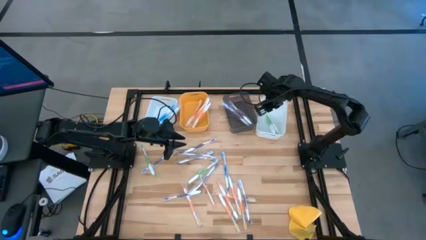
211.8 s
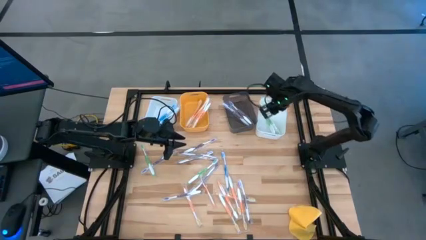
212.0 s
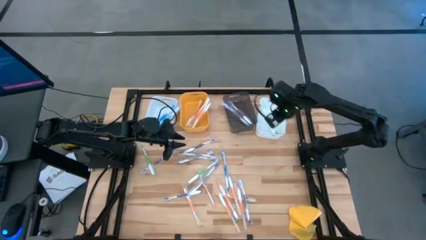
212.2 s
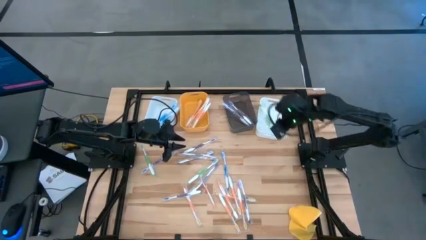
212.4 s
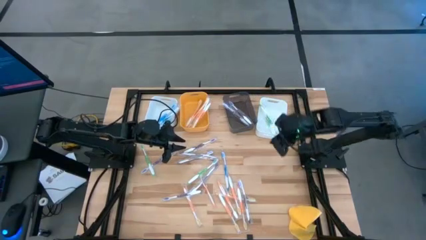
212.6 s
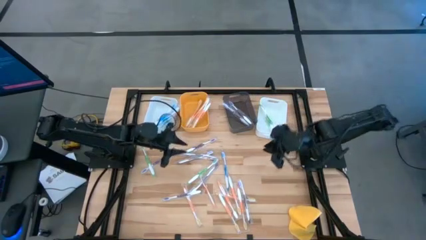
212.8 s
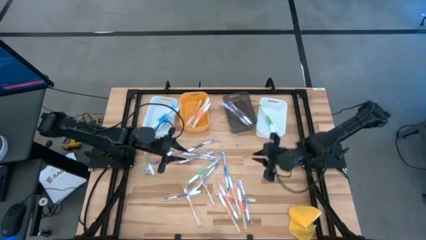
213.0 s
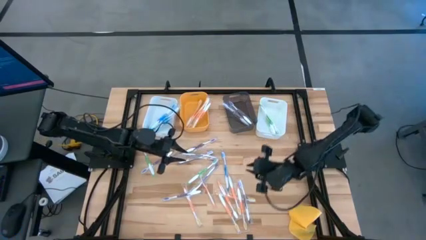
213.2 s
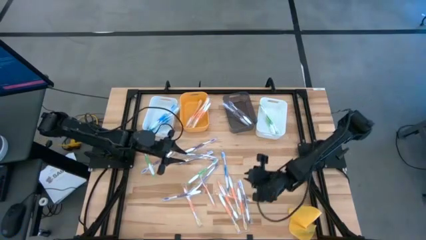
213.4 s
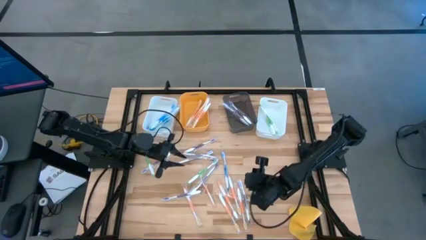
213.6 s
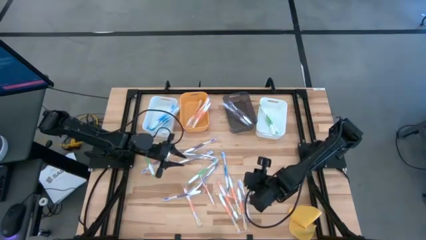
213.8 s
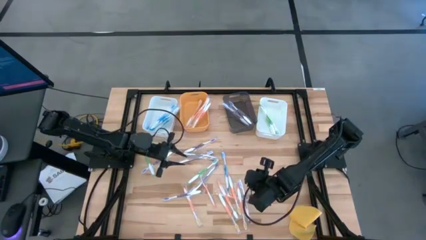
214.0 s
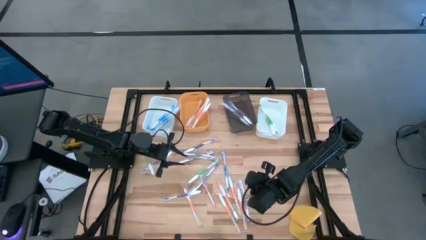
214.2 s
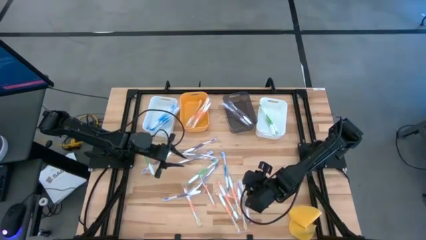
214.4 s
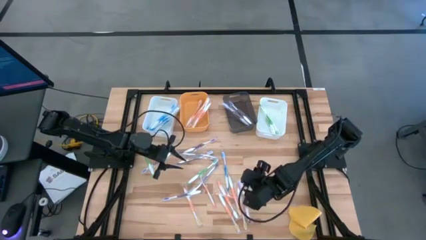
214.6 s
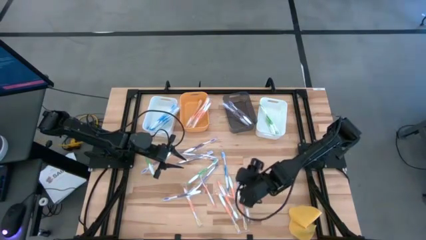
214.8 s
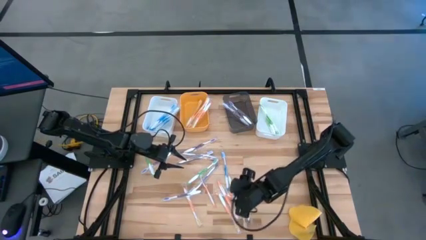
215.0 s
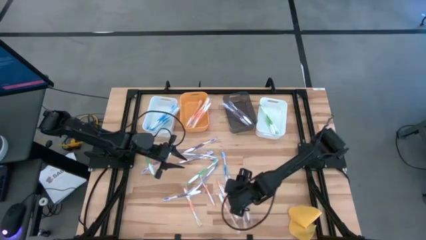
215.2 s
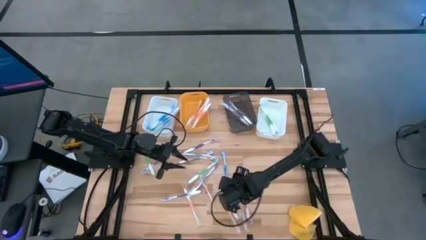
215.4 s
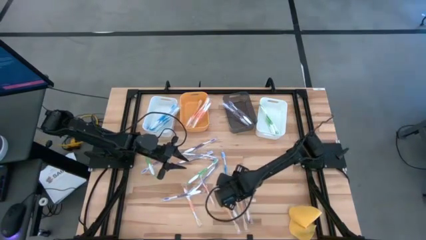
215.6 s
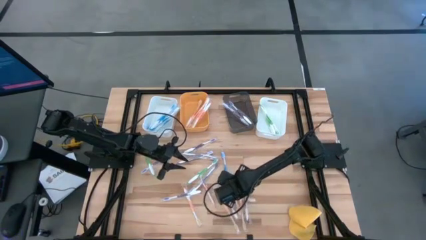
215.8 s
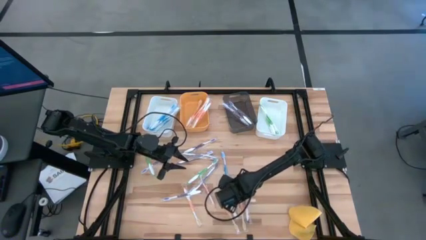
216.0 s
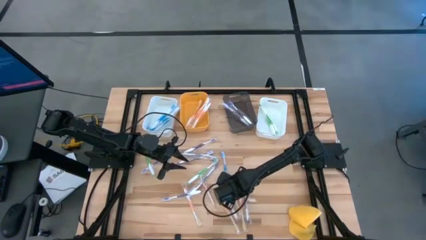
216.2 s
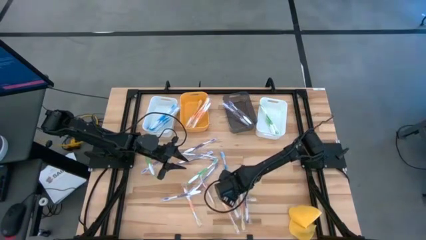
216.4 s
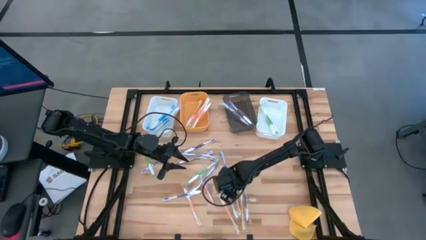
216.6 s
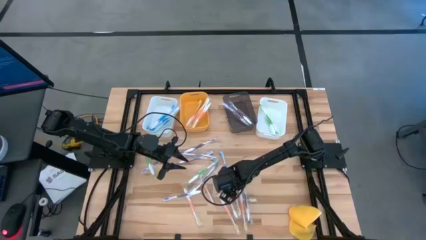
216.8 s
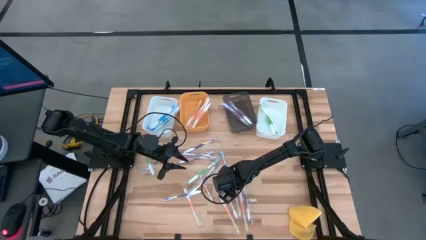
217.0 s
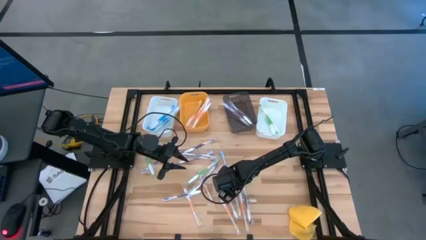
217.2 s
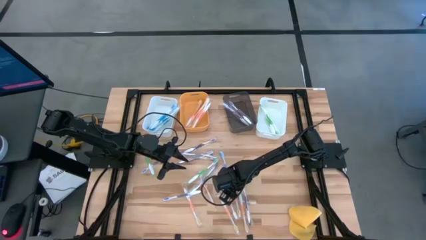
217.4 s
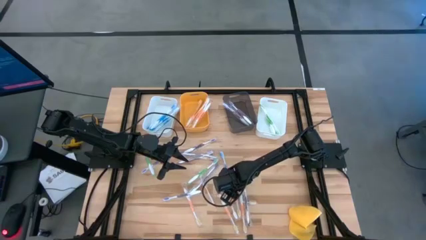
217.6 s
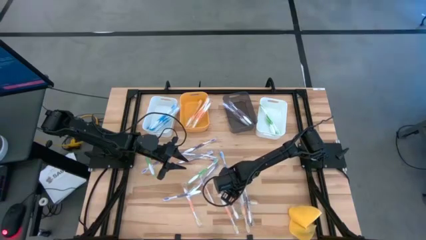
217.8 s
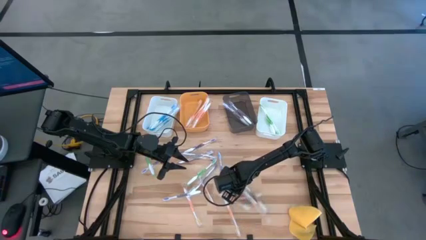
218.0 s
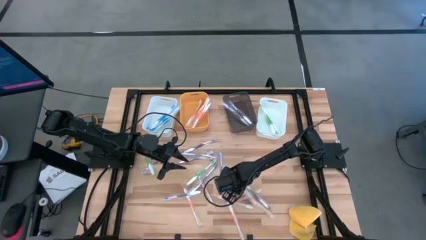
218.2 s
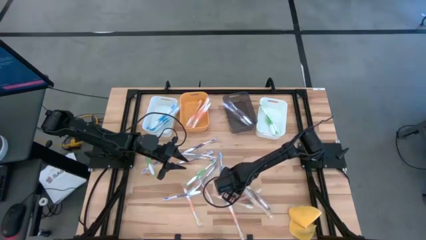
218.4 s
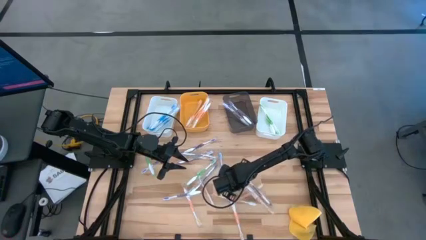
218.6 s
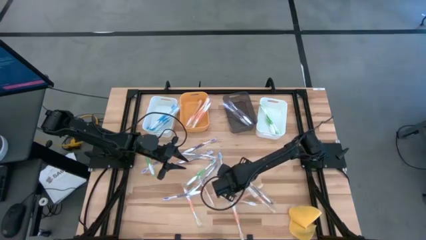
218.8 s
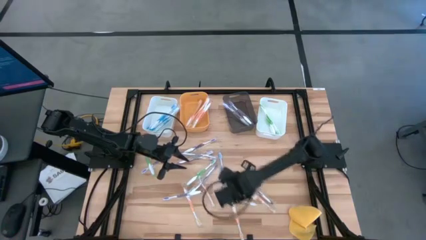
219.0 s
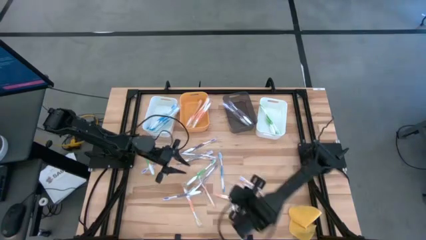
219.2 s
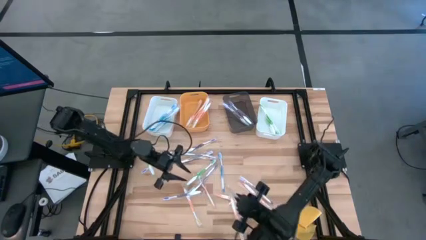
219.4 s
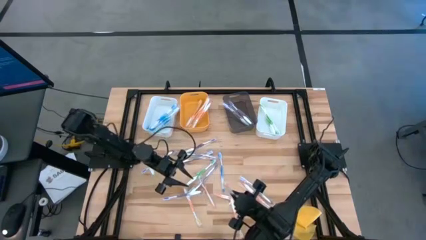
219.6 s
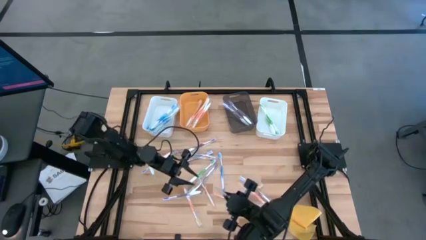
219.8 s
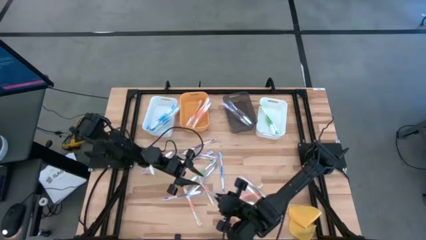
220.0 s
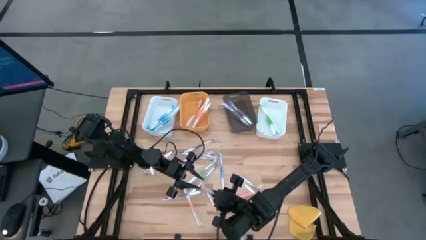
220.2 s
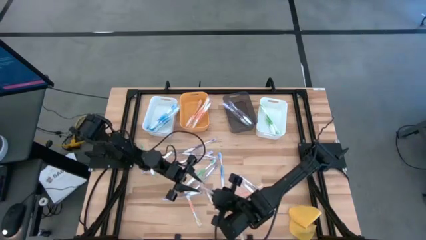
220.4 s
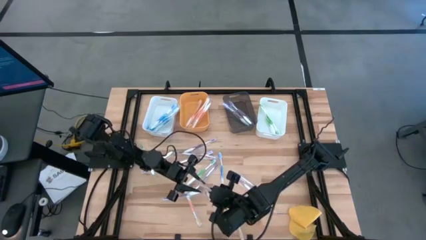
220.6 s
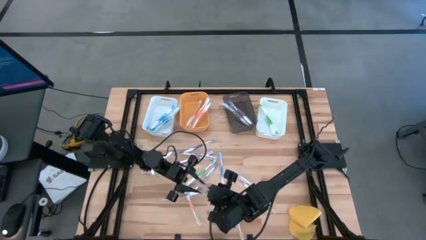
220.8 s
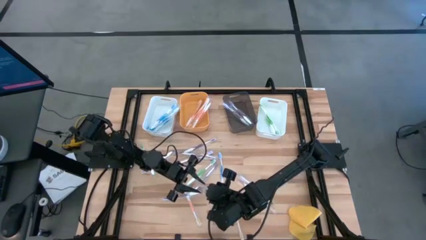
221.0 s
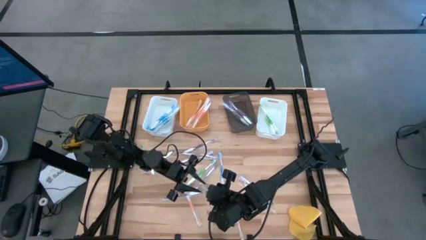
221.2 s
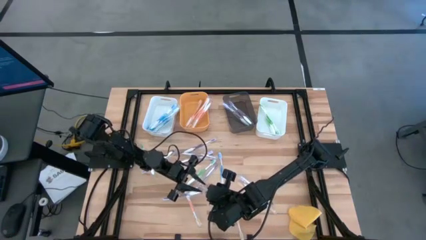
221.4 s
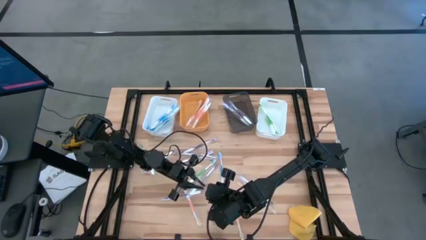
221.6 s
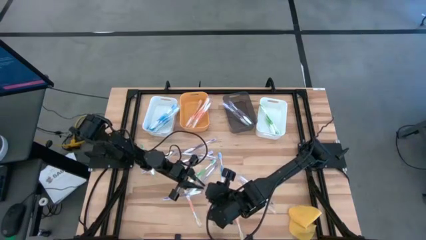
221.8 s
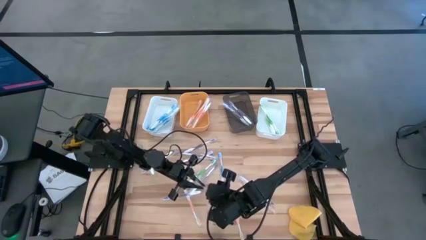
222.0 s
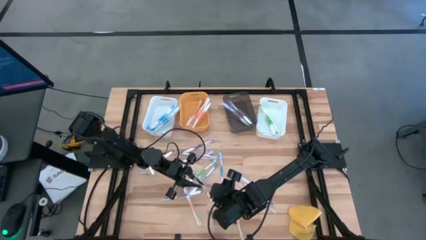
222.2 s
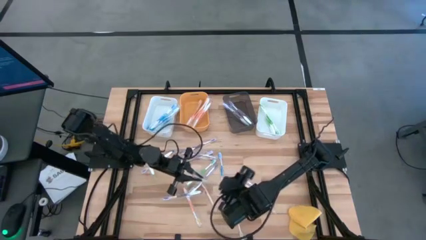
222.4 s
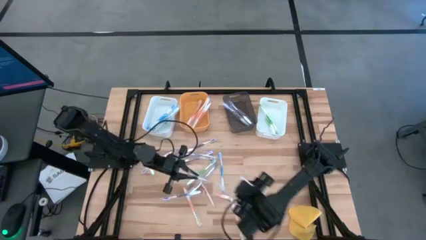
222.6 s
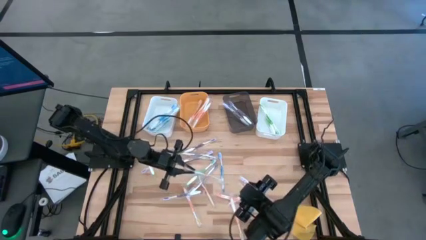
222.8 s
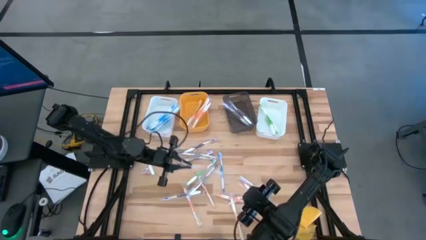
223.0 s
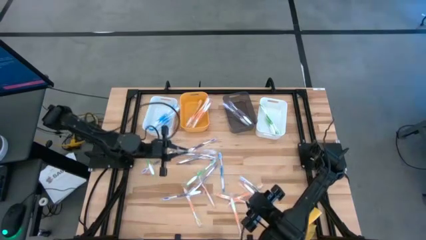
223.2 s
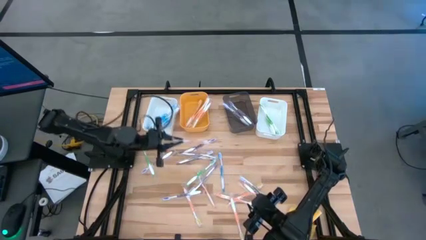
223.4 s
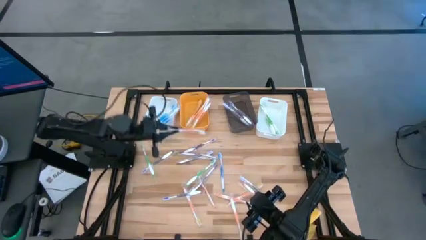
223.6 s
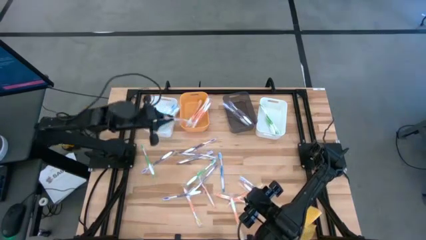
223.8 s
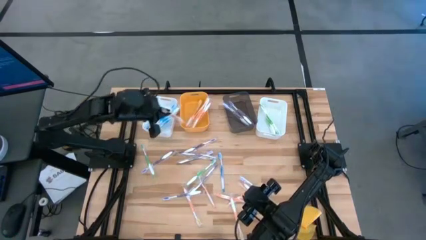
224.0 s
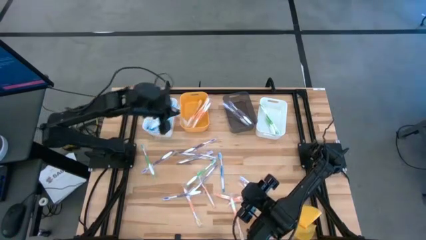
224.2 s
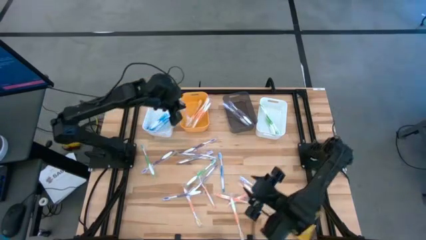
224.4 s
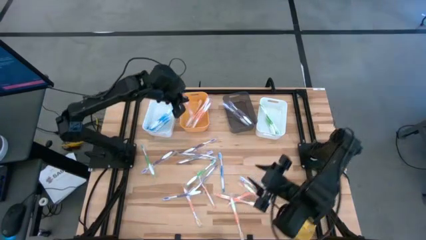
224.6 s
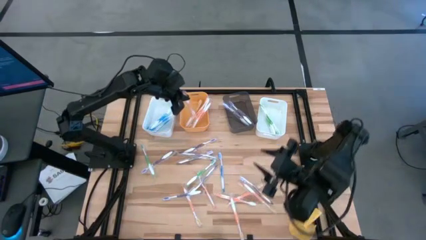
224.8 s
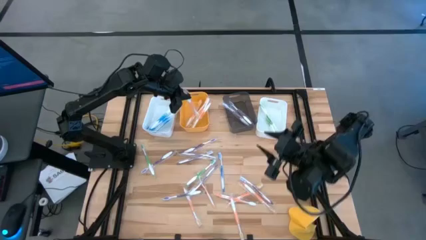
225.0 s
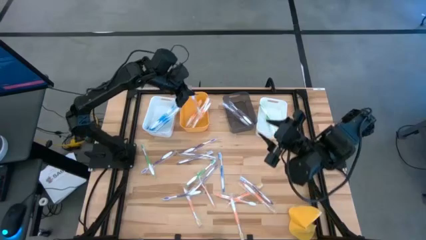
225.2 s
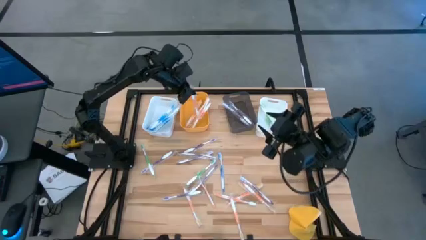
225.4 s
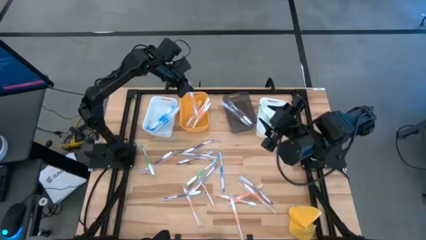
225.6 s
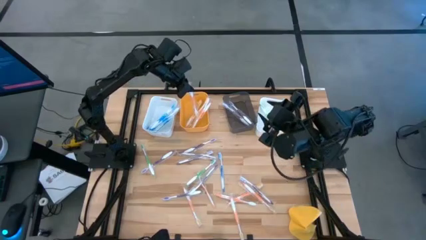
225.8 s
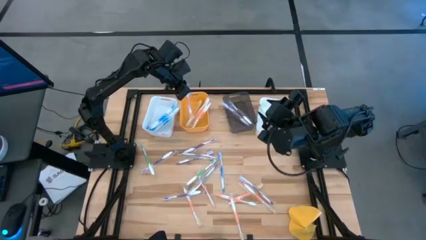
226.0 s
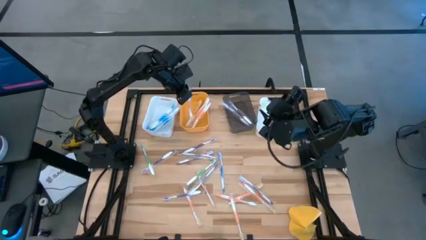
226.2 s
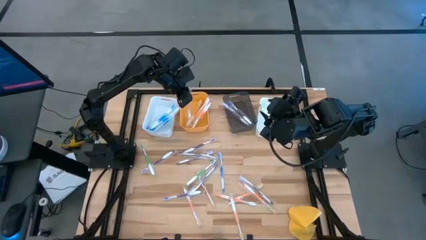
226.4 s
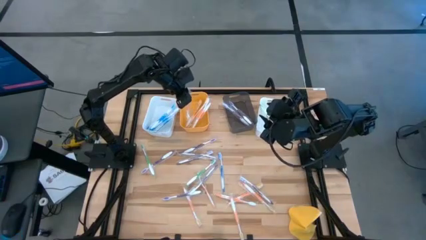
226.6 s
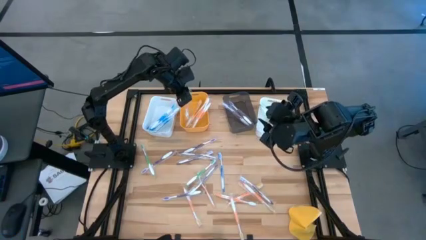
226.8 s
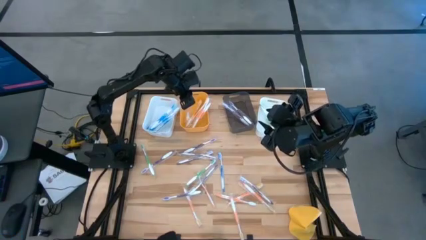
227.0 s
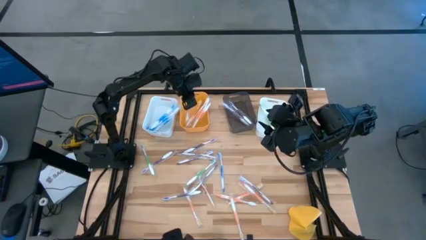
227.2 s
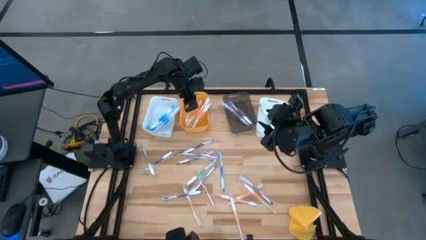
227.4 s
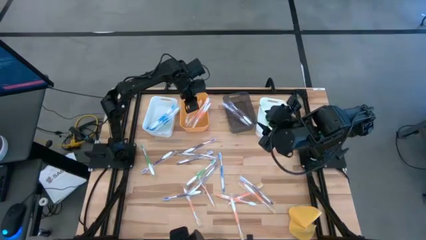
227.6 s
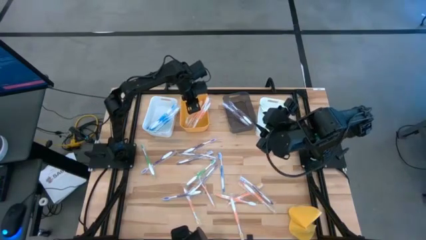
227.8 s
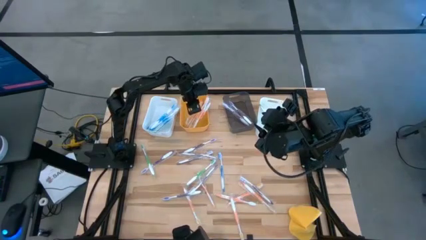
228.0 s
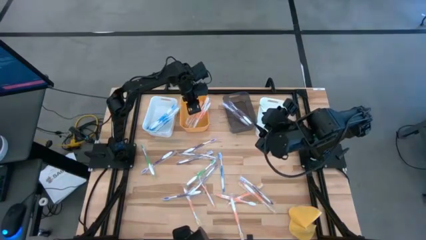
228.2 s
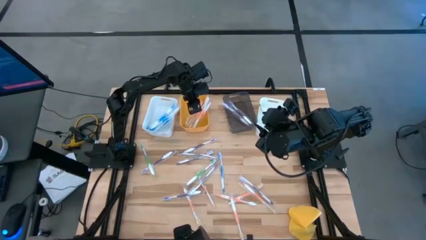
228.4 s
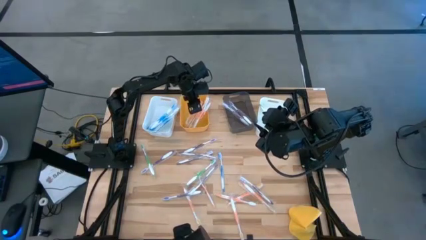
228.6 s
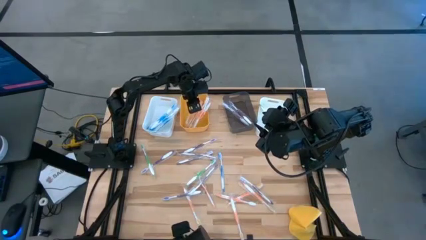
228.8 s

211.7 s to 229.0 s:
Task: Pick & Place Toothbrushes
Put the orange toothbrush into the yellow bin

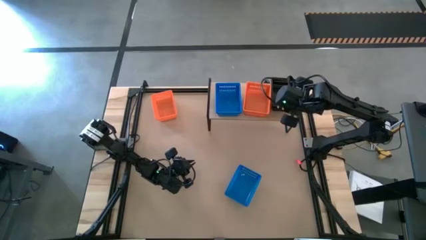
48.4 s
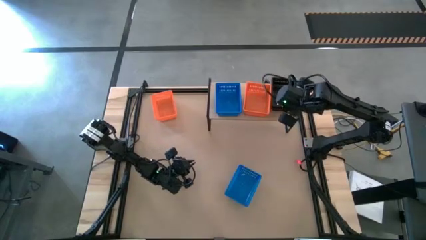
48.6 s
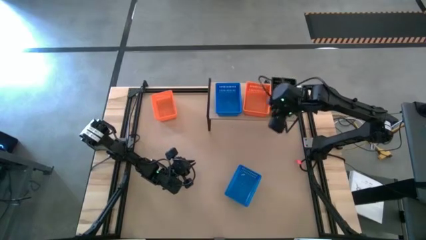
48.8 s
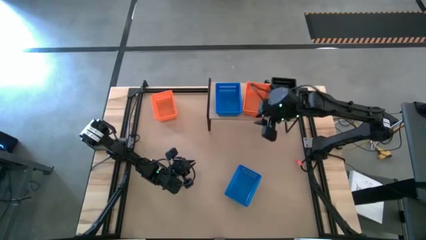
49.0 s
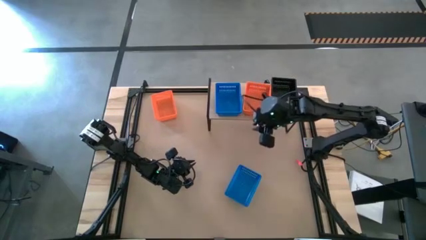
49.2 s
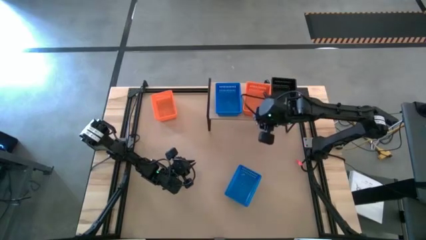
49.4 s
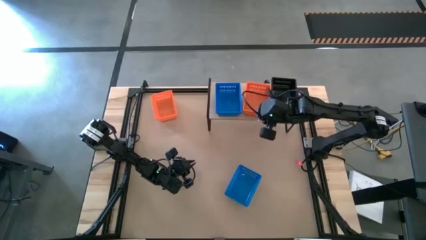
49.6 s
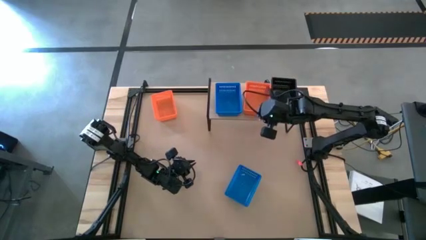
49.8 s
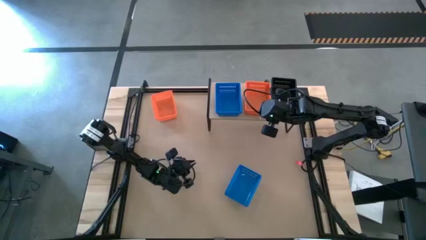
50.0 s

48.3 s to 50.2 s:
Task: Stack baskets on shelf by color
Adjust the orange bin
